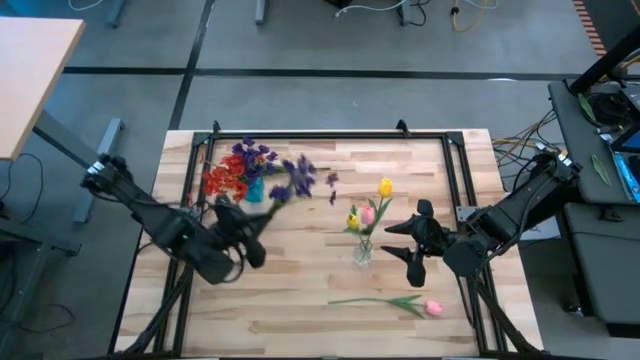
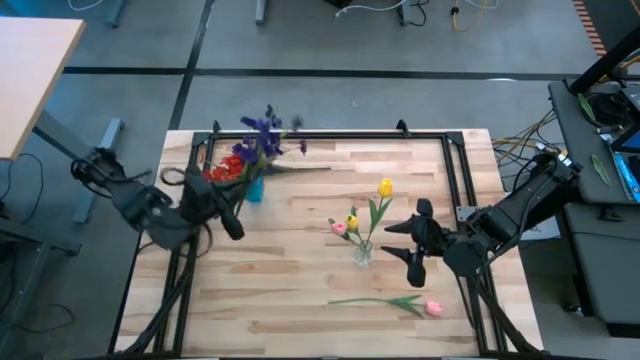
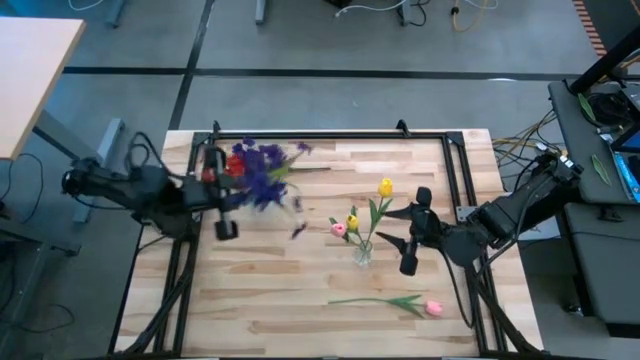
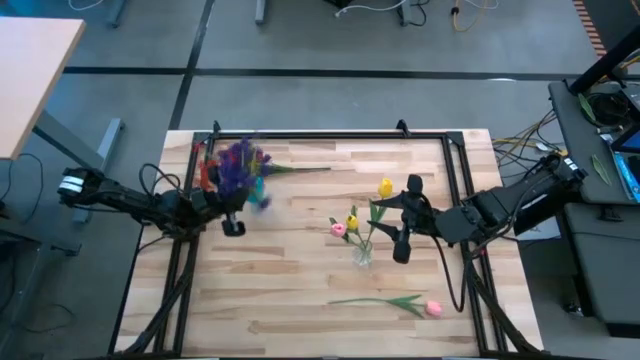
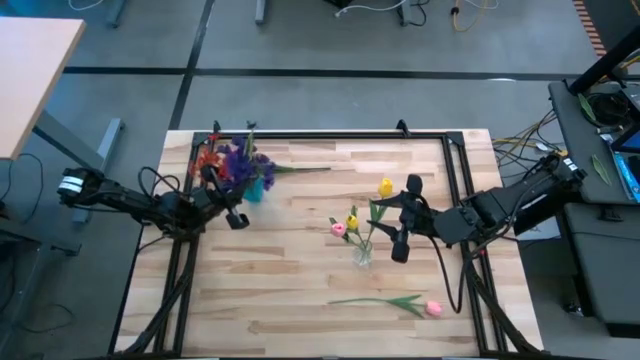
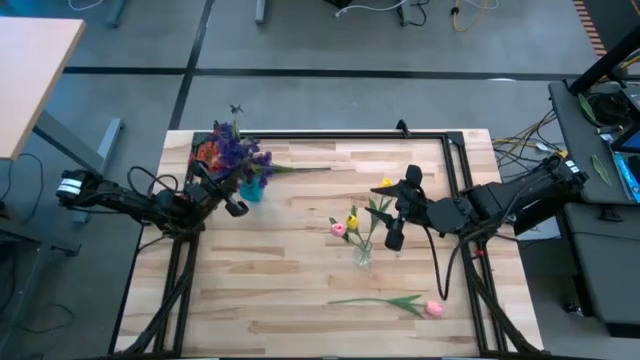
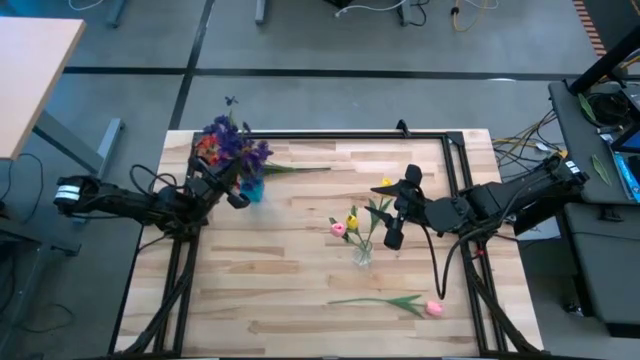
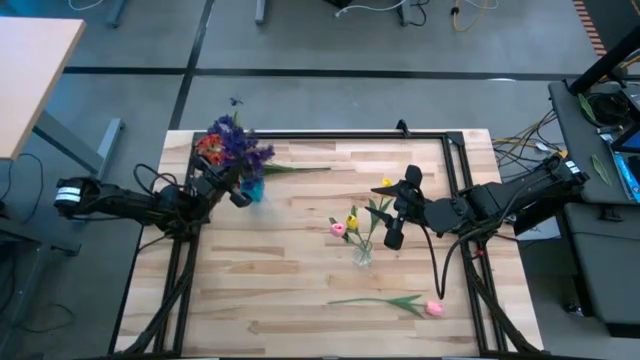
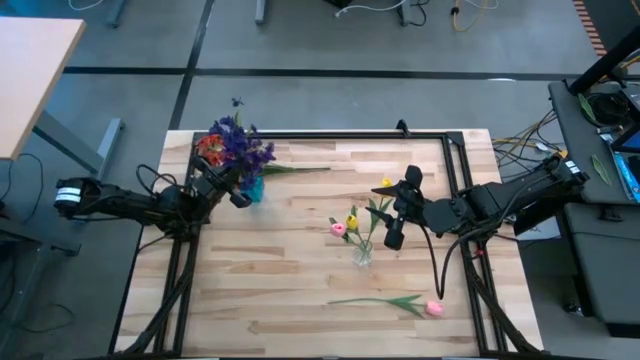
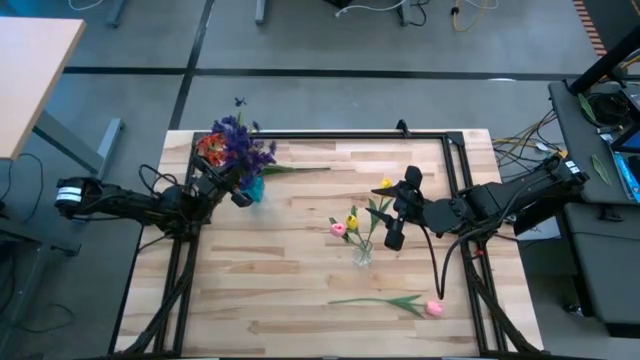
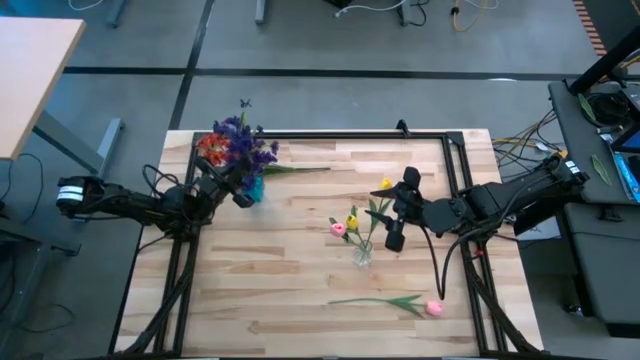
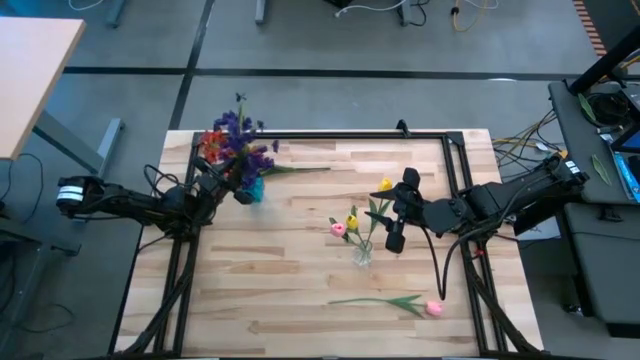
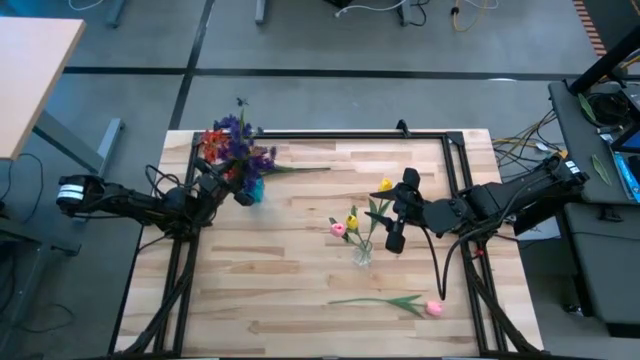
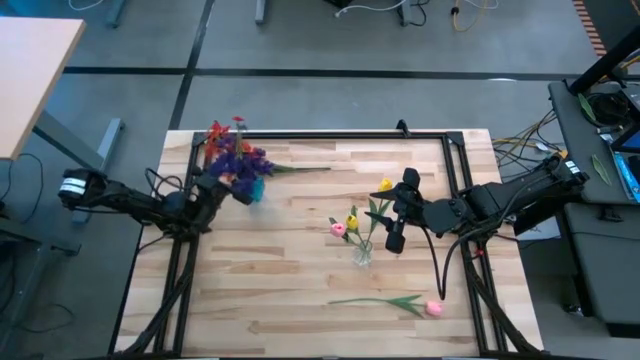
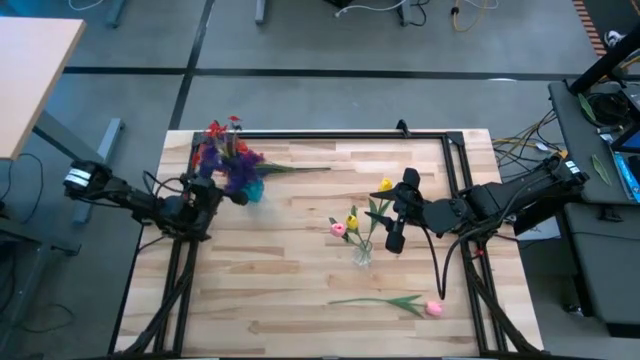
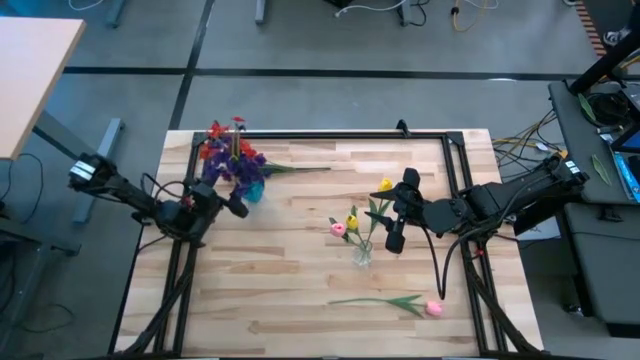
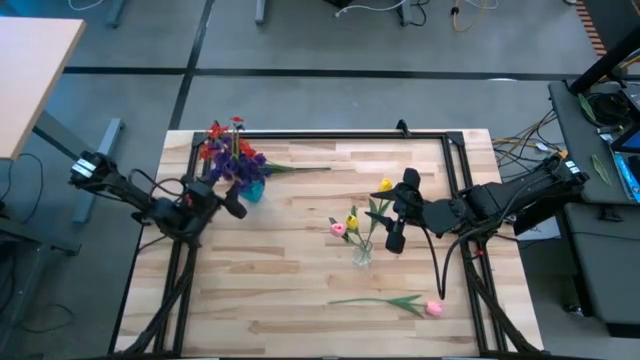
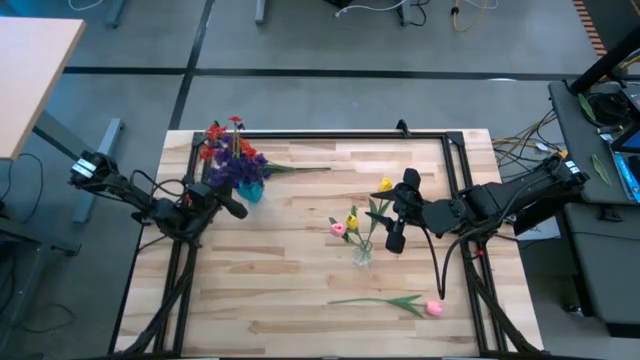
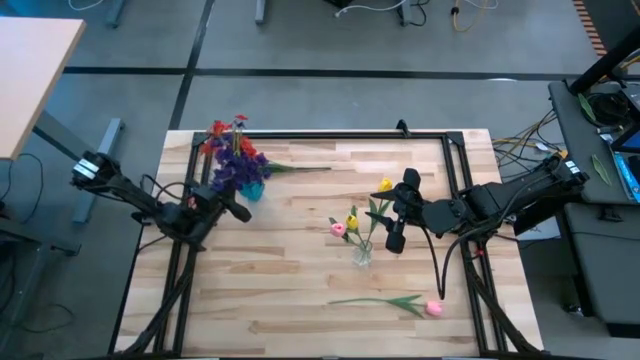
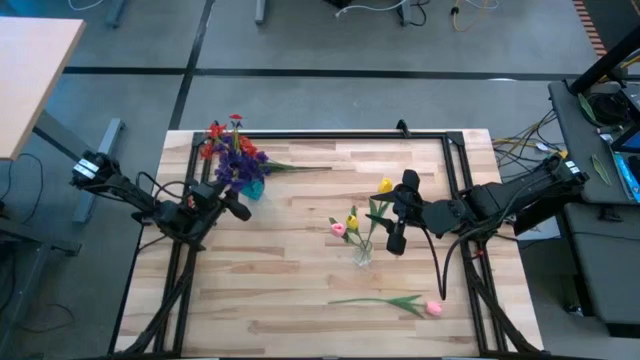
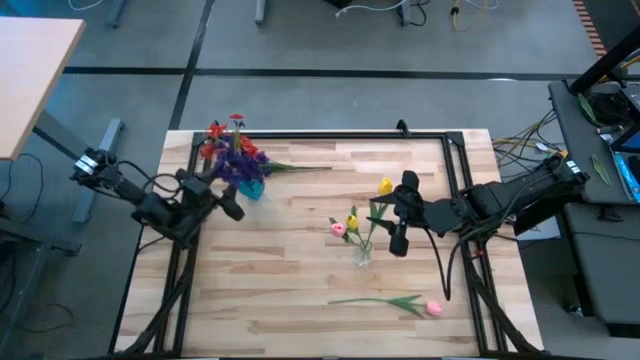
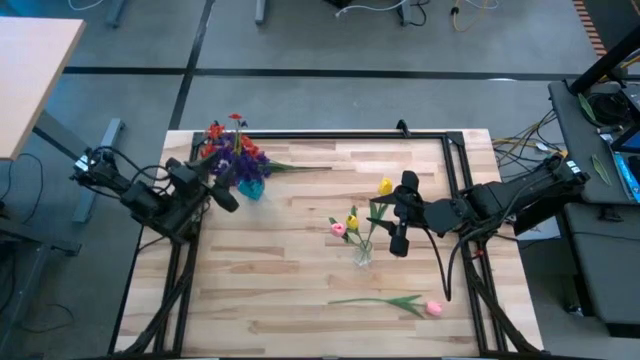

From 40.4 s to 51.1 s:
Task: Sort flowers into vase by color
Put the violet flowers into the blue vase

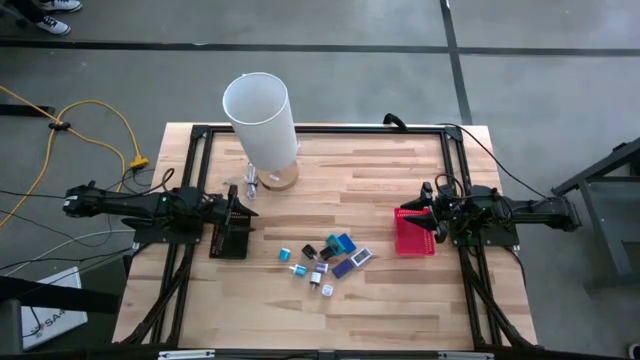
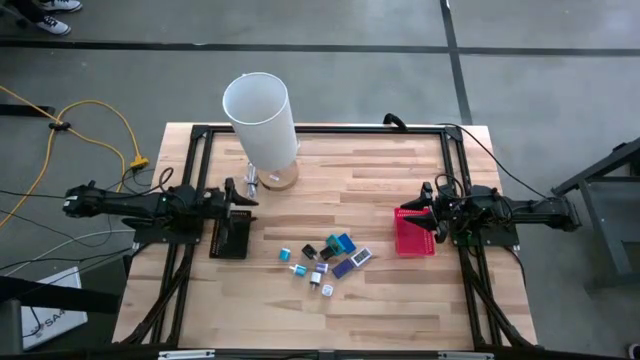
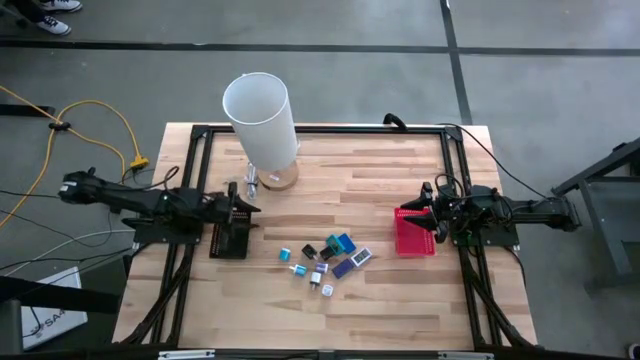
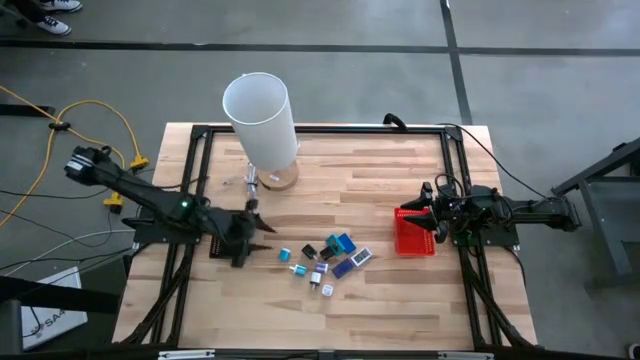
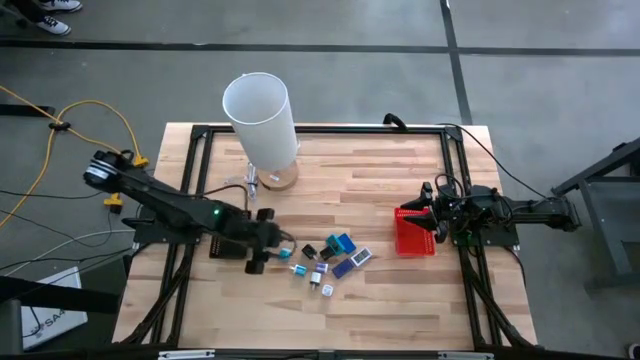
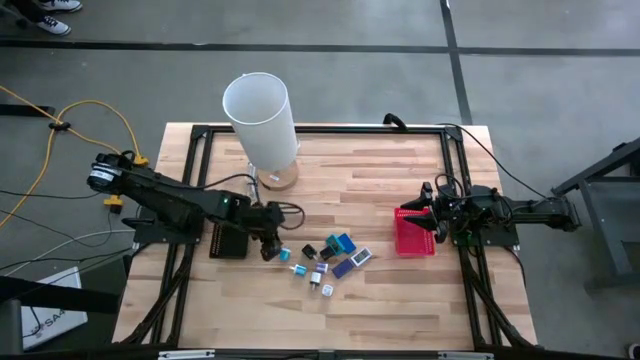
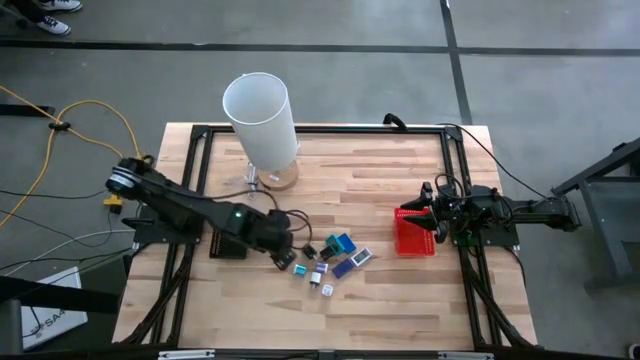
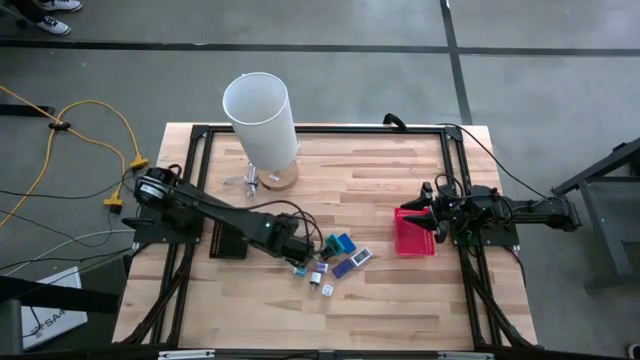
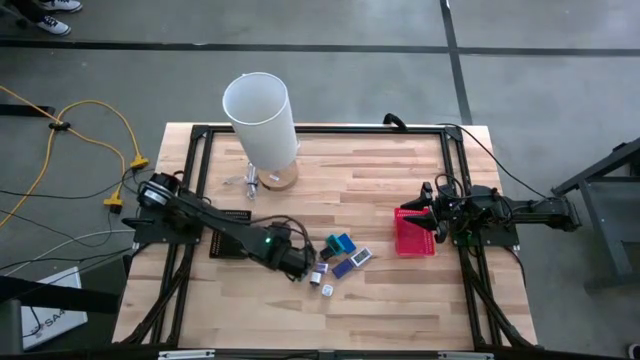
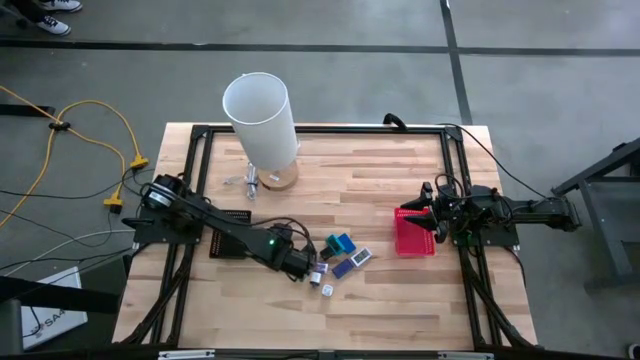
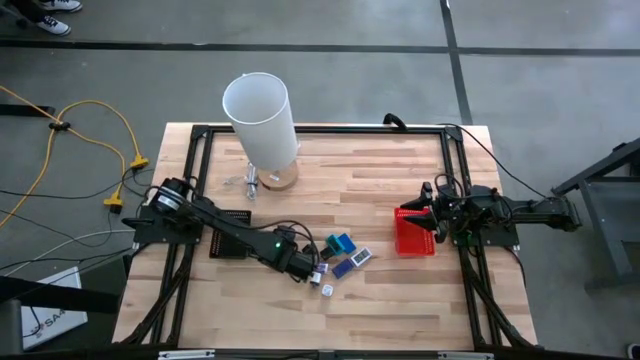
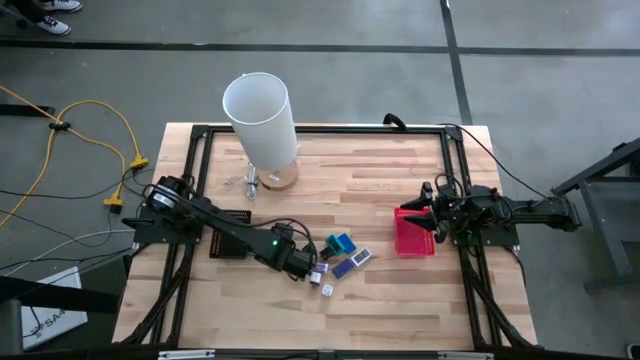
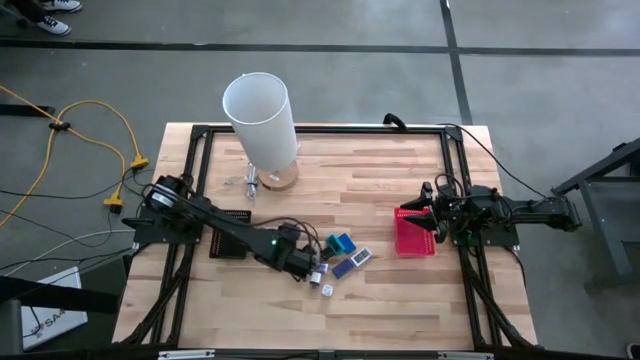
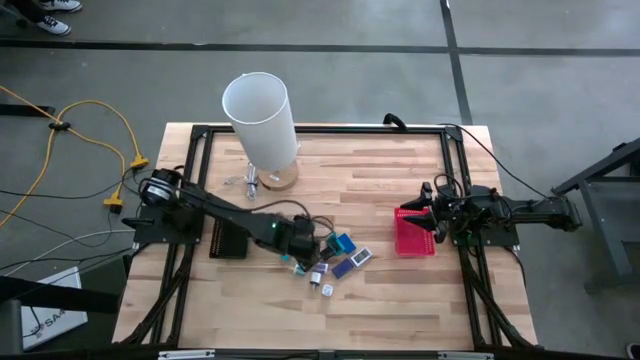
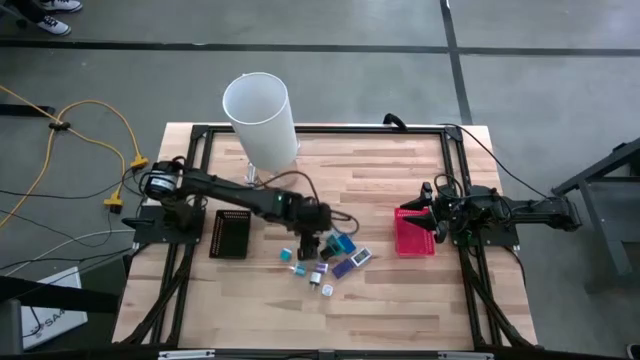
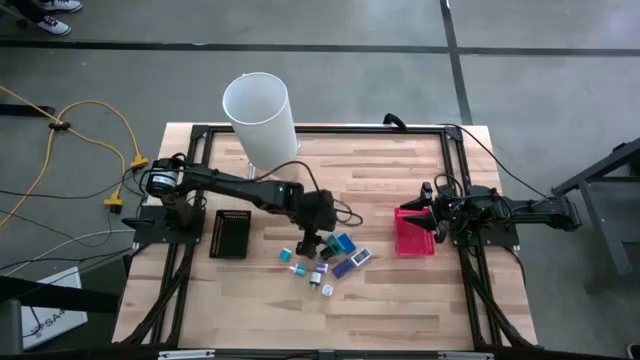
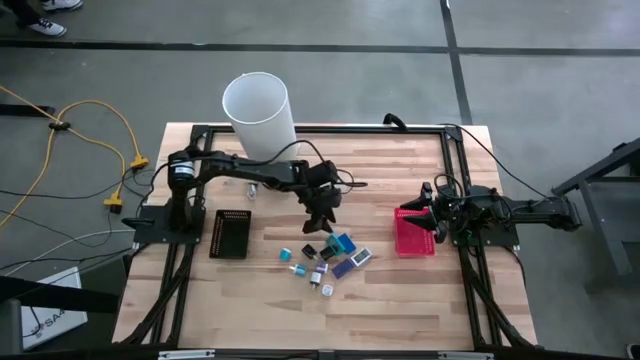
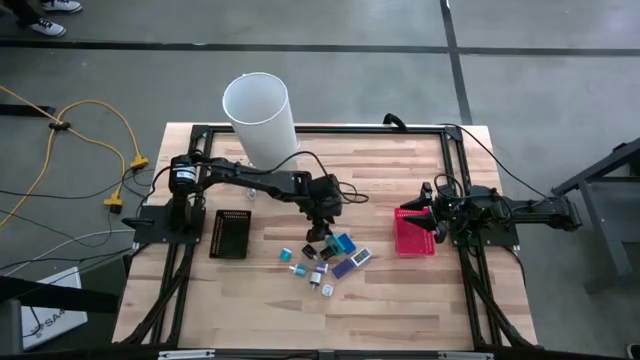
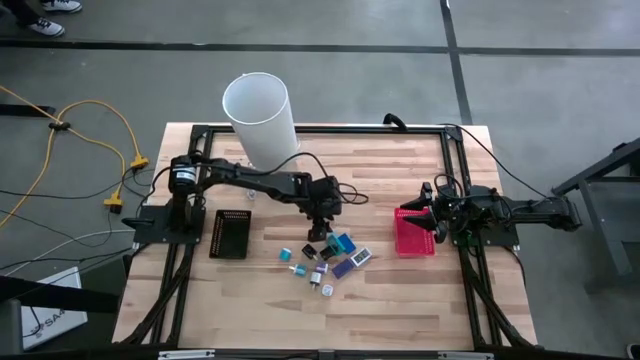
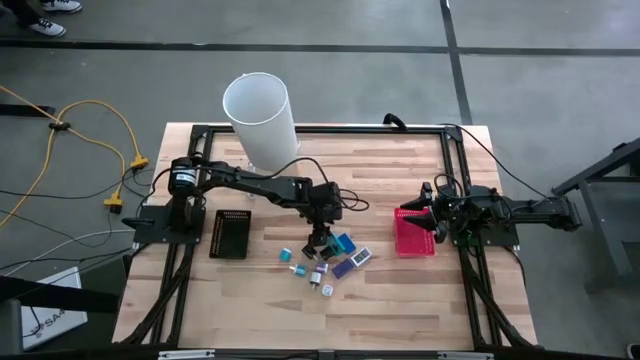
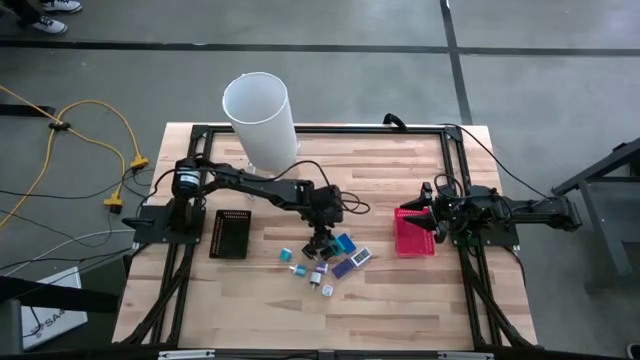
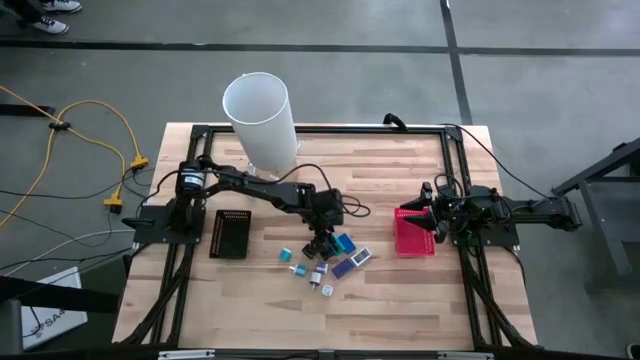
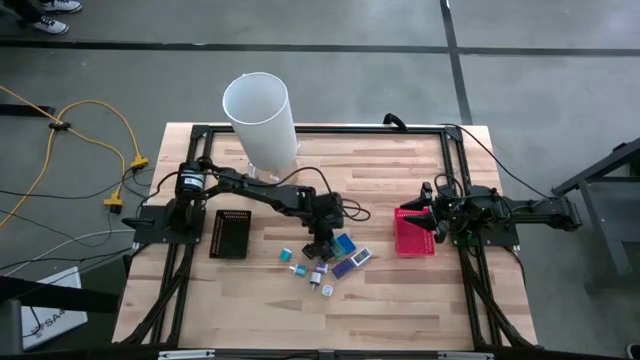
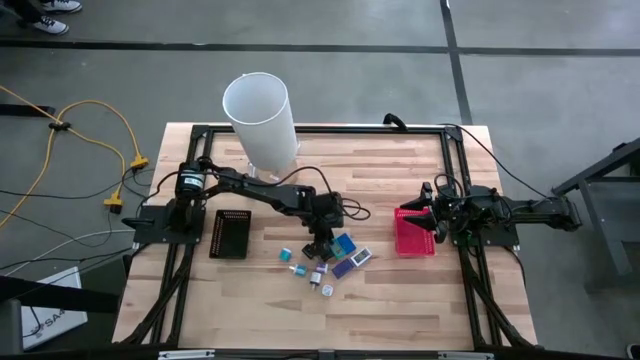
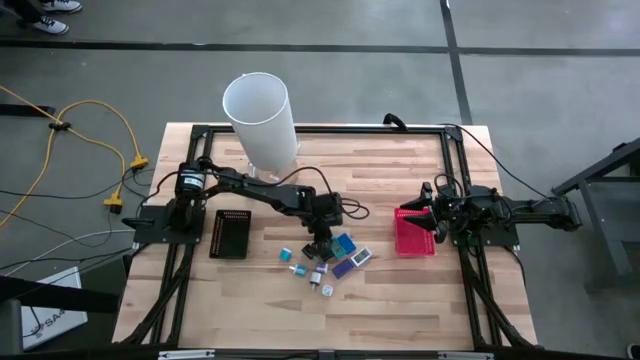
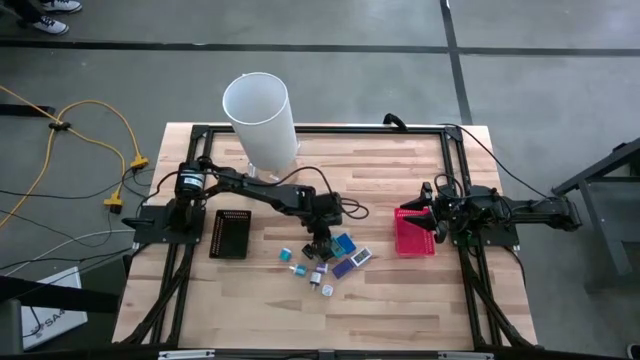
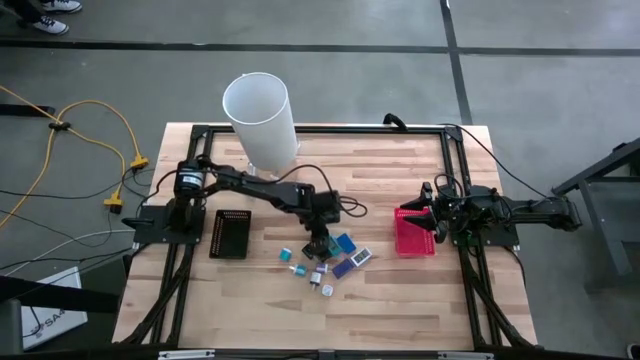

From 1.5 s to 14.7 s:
Task: Pick & Place Office items
Put the blue digital timer into the black bin
